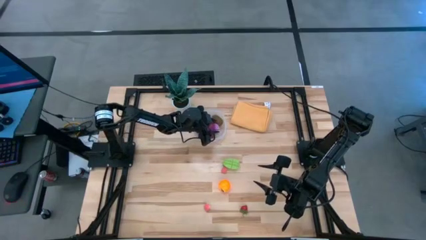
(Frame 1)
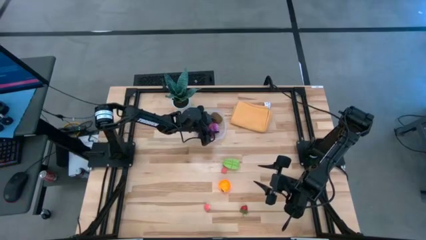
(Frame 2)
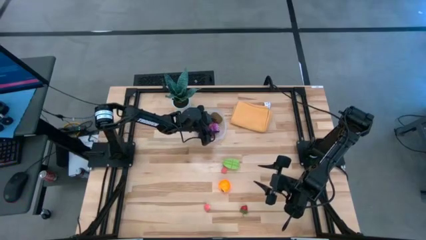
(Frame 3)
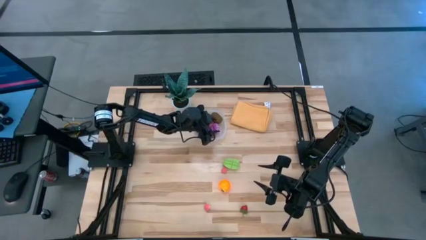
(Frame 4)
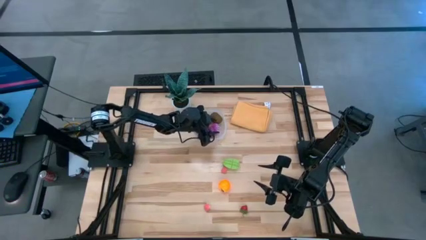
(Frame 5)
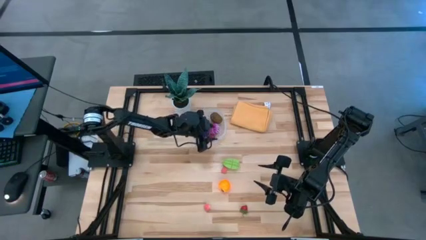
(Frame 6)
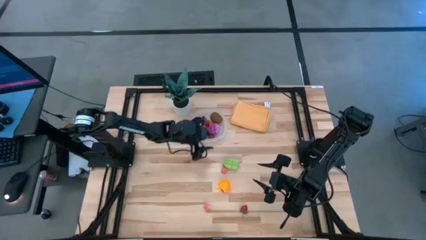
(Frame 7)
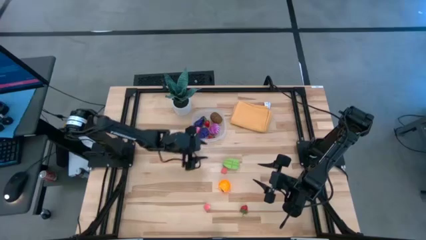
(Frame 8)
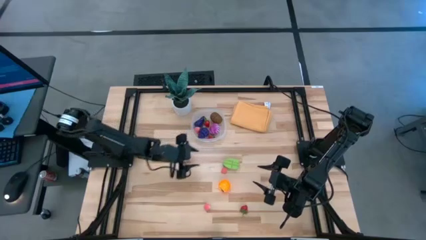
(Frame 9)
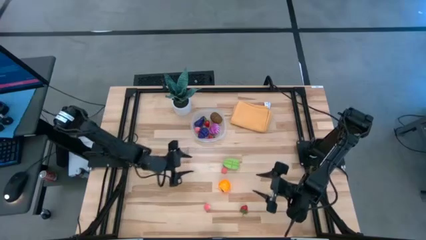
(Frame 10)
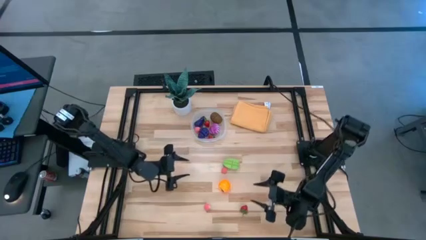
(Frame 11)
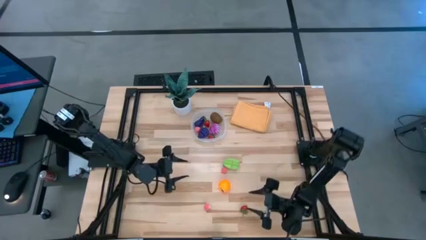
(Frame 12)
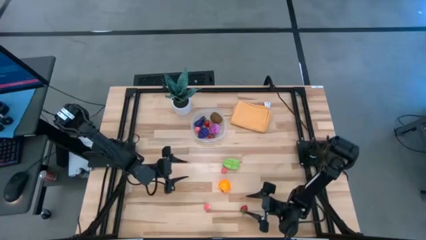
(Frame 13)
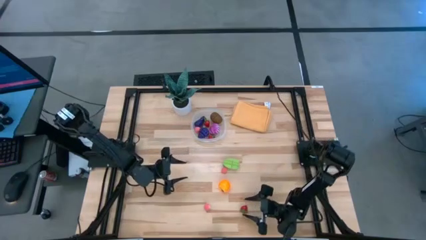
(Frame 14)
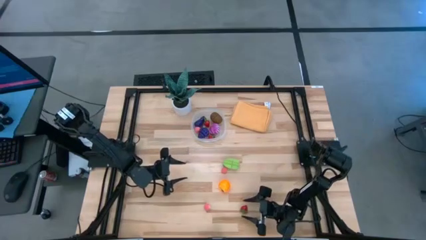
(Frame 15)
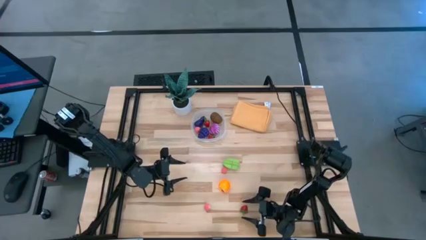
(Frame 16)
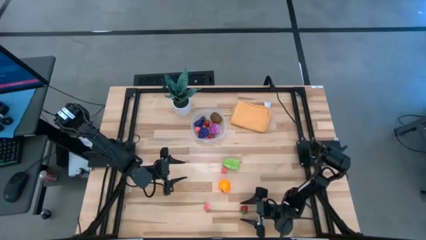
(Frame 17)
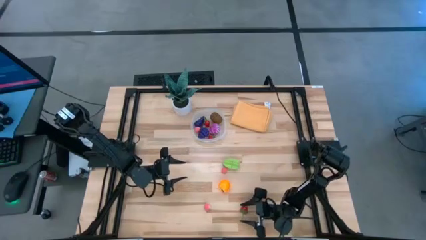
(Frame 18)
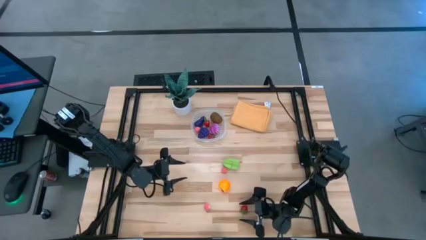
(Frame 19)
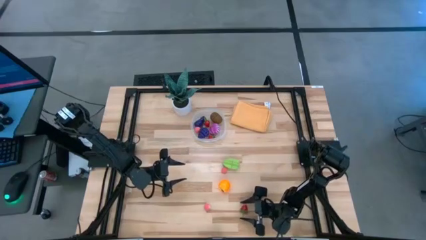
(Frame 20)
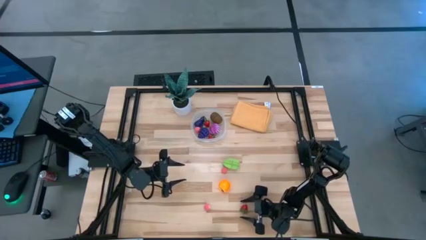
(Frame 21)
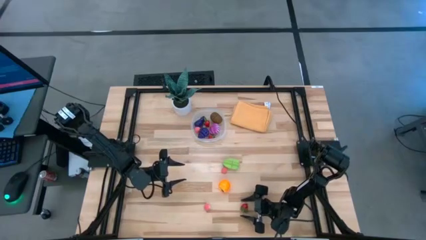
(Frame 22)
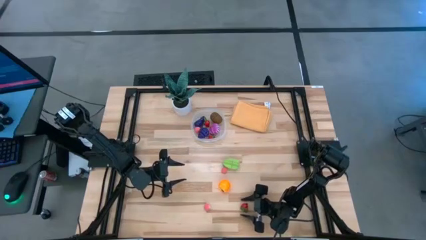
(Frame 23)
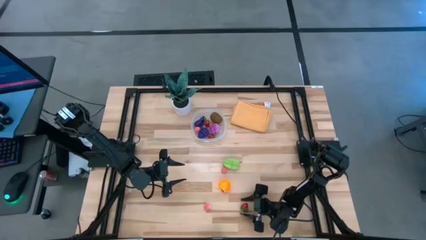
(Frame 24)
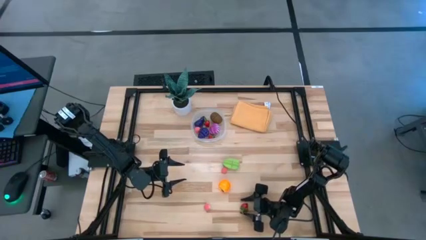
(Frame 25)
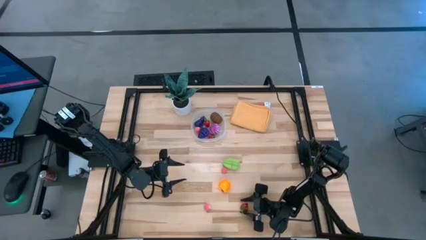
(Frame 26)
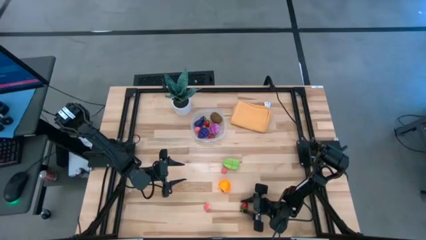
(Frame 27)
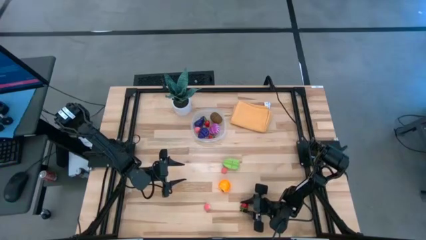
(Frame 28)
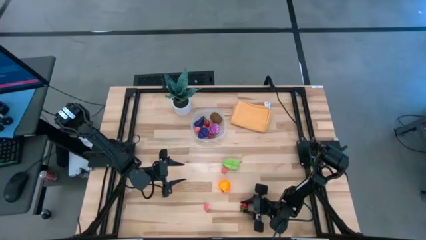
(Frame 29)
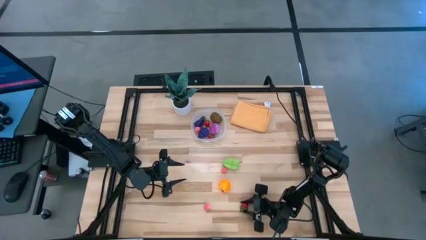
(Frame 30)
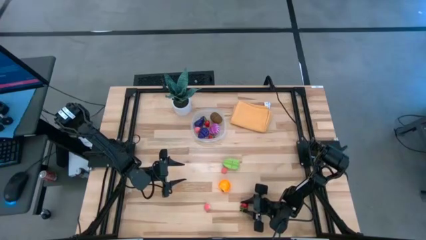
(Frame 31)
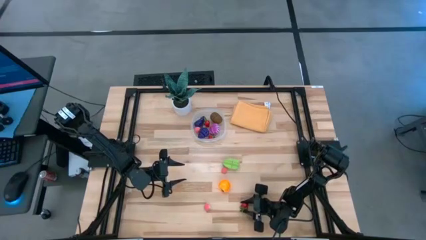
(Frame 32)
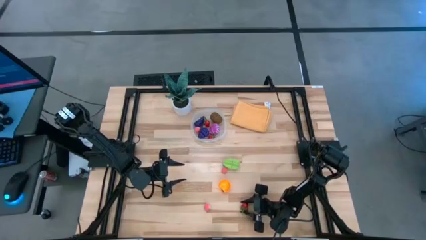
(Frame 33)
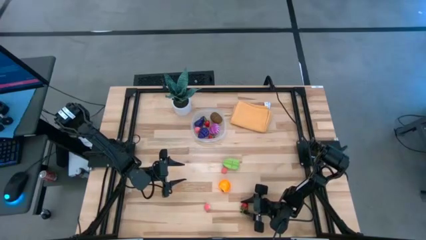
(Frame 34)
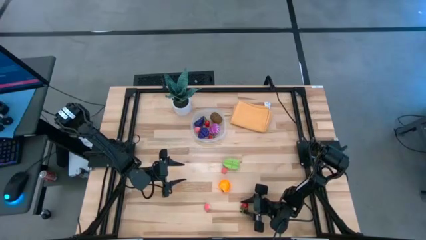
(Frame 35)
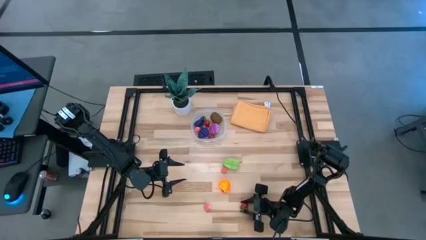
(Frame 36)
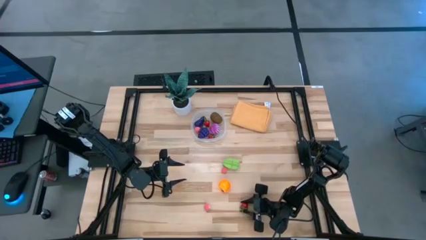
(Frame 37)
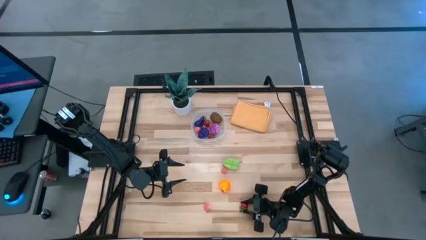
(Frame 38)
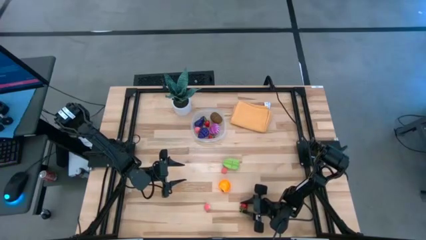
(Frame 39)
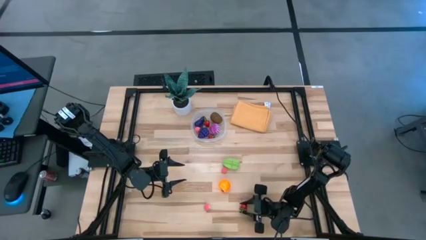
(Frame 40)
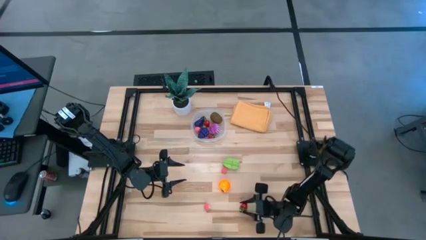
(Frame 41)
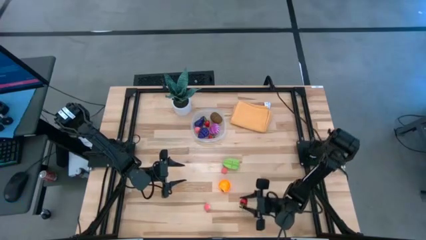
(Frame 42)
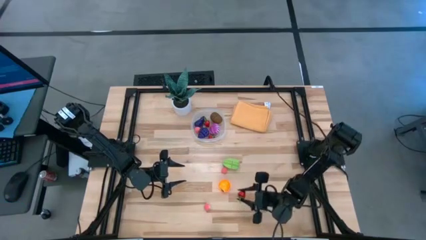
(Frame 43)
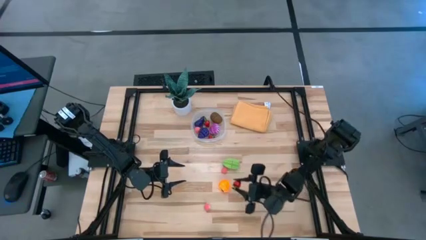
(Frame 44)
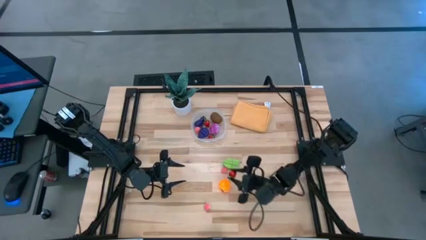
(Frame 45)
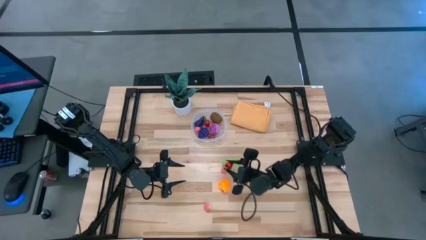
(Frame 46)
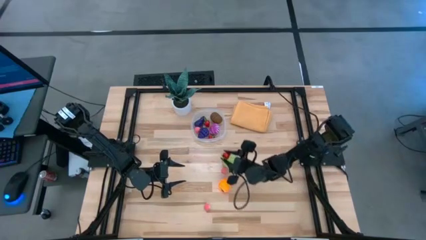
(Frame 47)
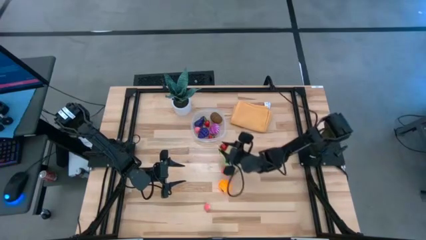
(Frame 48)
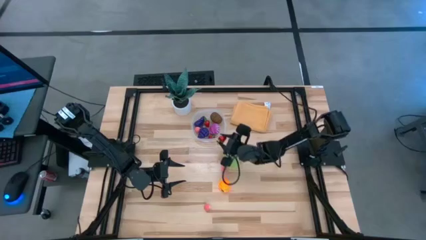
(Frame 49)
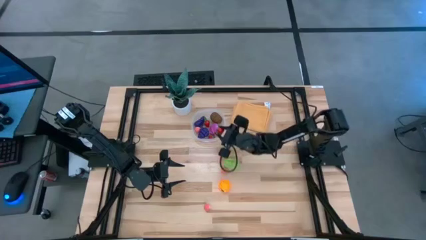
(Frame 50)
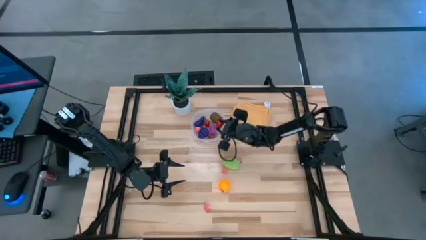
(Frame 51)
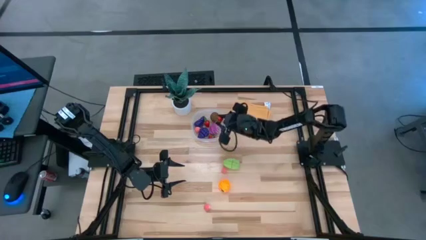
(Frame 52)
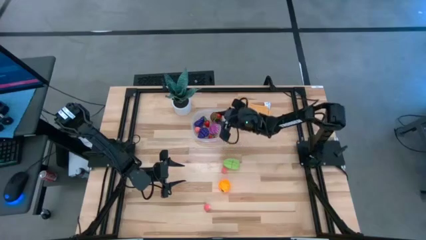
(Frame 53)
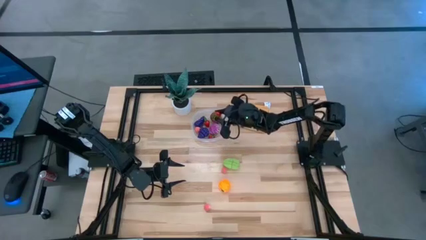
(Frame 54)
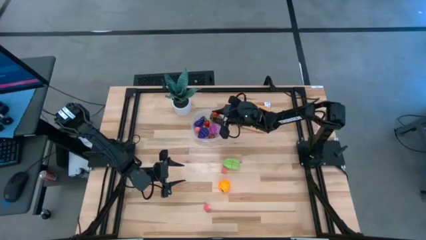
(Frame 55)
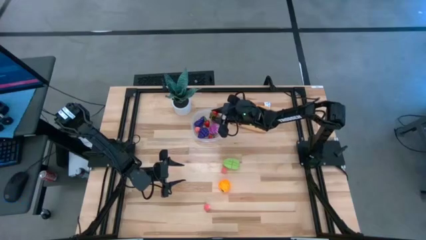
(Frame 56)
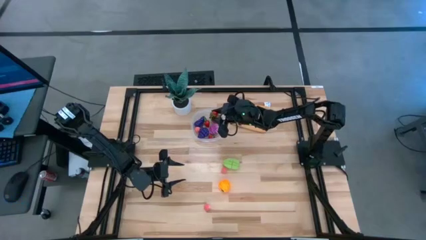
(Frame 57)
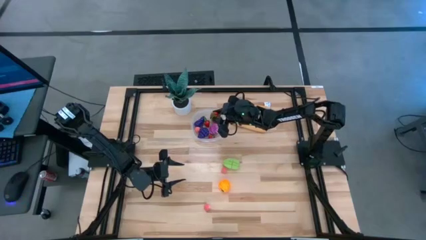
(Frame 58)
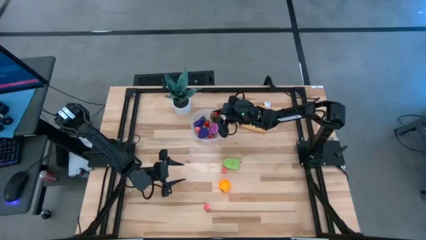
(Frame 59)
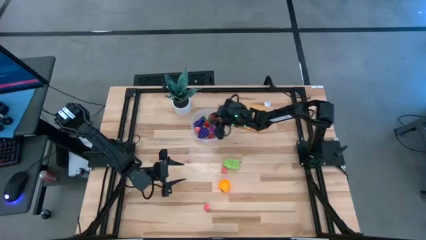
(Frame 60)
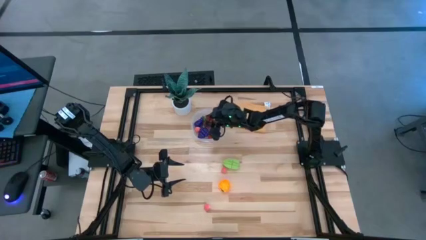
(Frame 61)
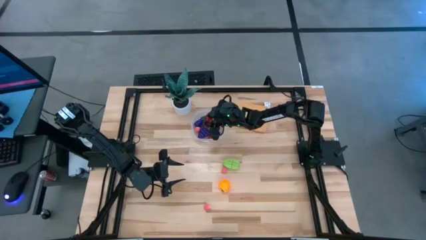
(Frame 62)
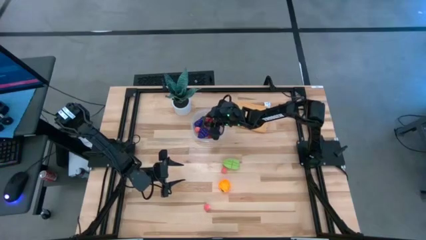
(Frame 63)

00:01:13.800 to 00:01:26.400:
Task: Pick and placing Produce into tupperware
Put the red strawberry into the transparent bin
